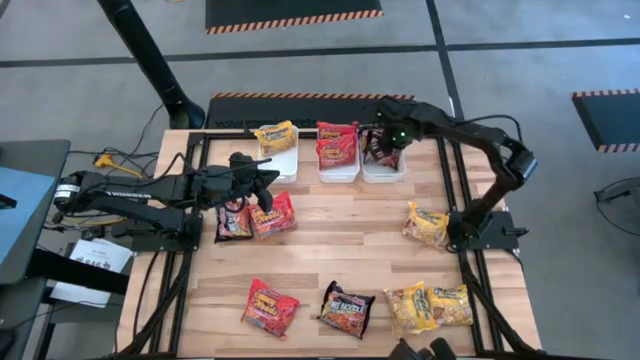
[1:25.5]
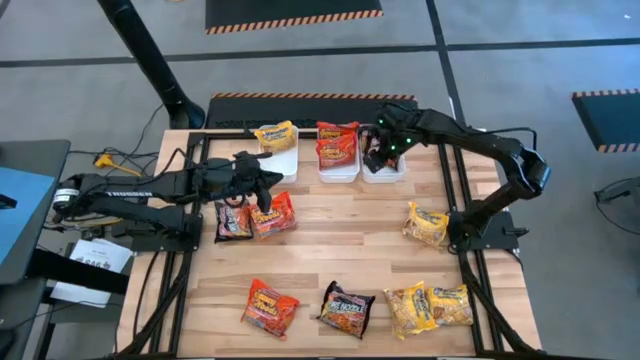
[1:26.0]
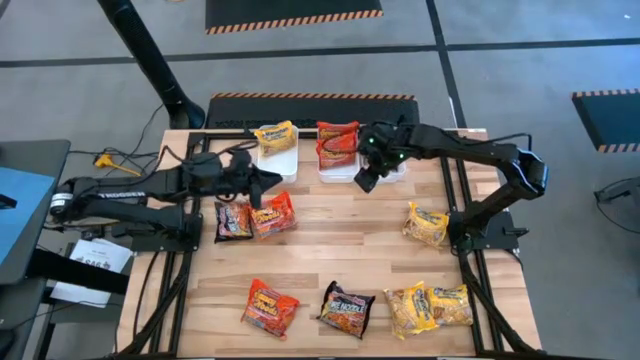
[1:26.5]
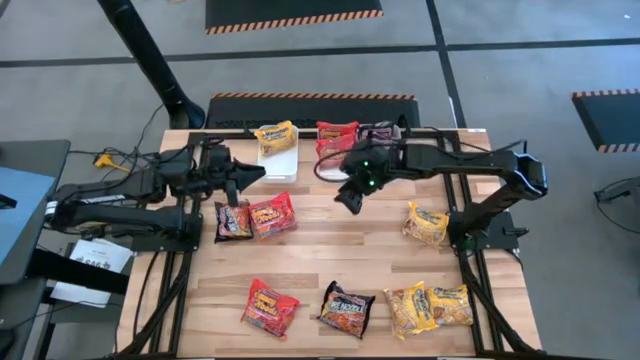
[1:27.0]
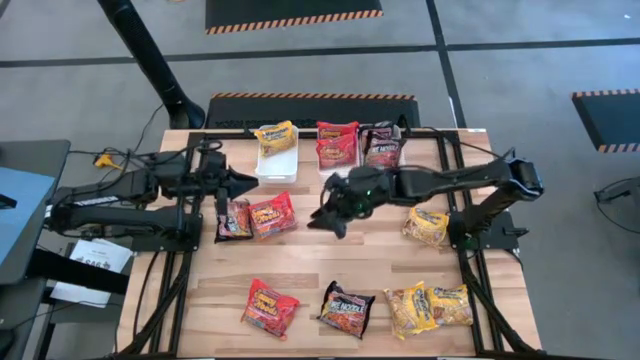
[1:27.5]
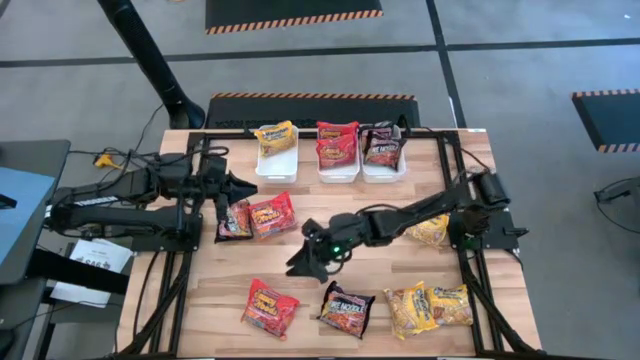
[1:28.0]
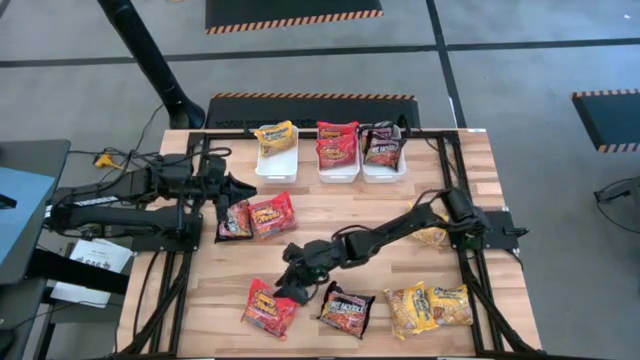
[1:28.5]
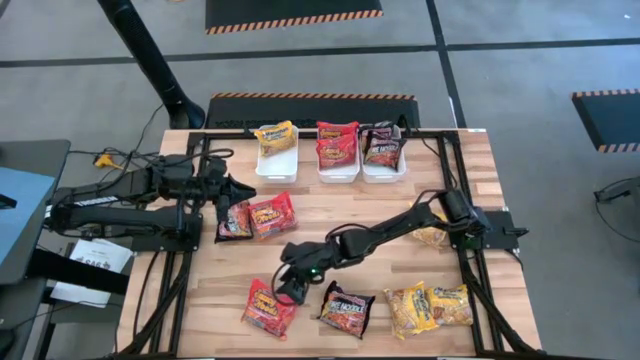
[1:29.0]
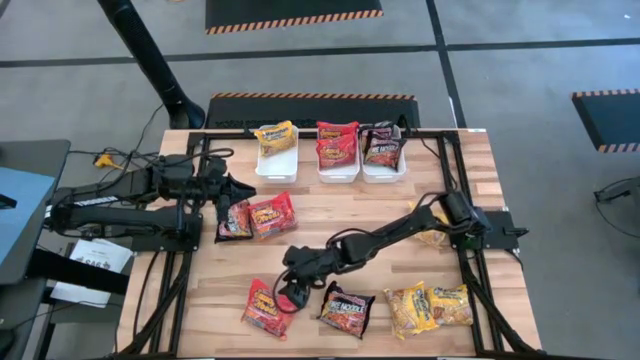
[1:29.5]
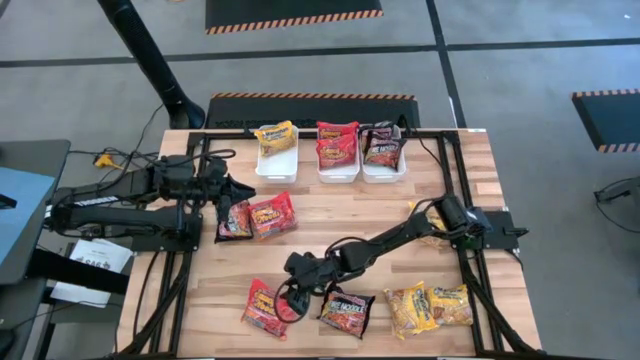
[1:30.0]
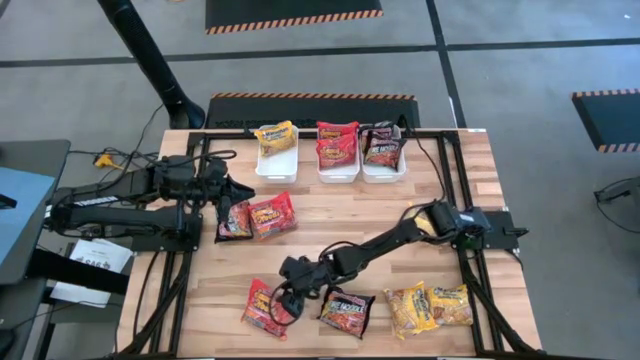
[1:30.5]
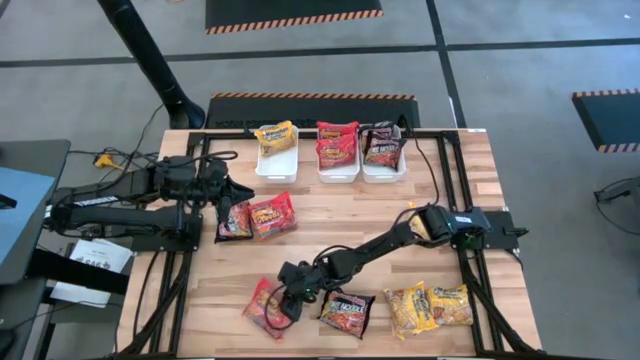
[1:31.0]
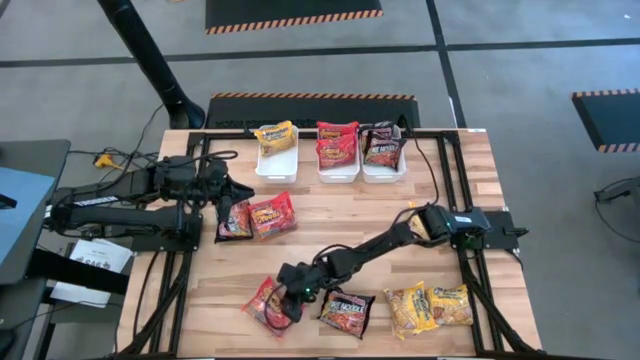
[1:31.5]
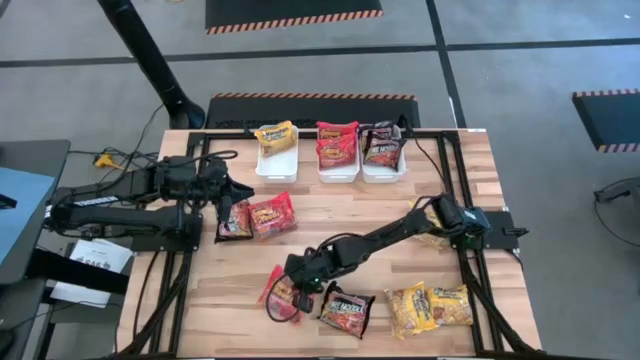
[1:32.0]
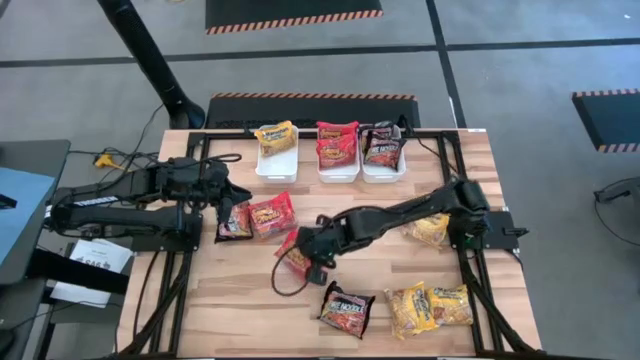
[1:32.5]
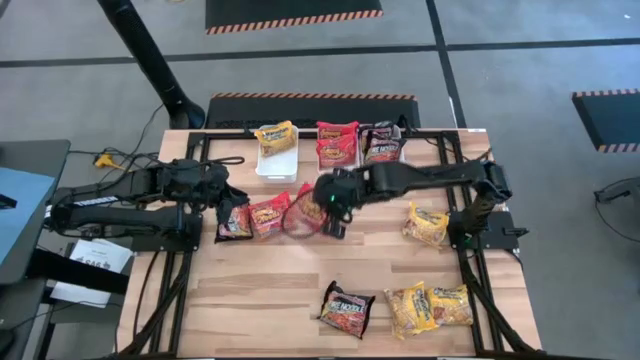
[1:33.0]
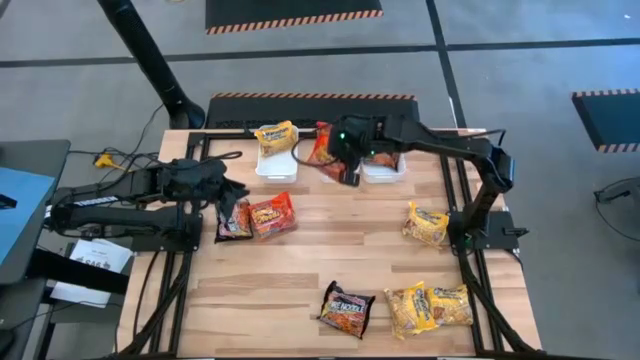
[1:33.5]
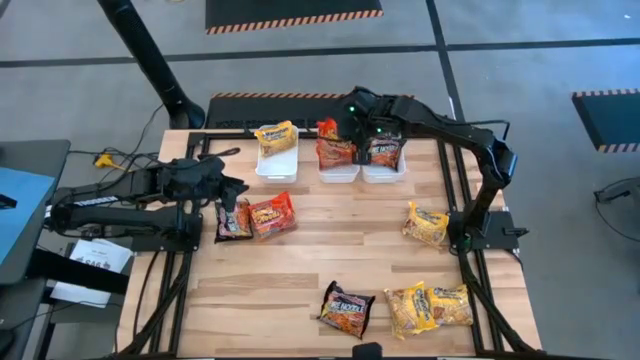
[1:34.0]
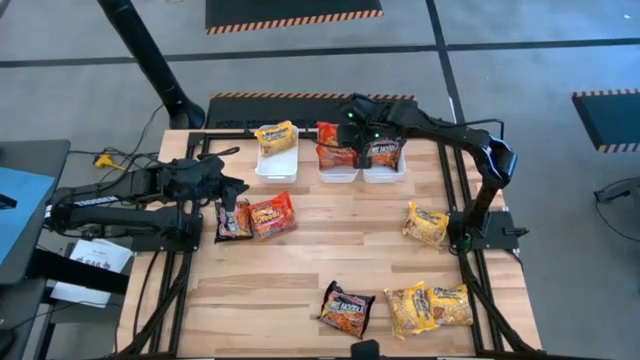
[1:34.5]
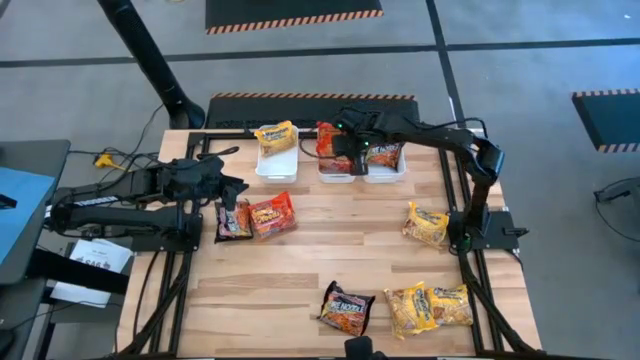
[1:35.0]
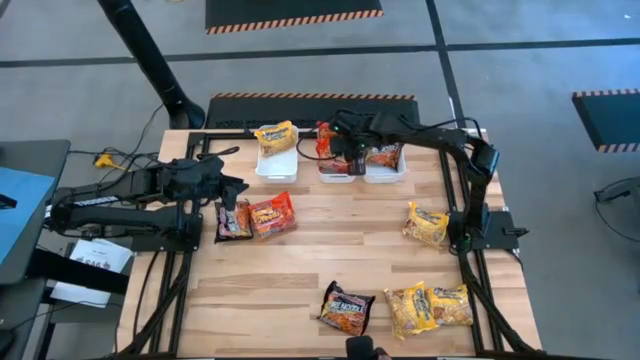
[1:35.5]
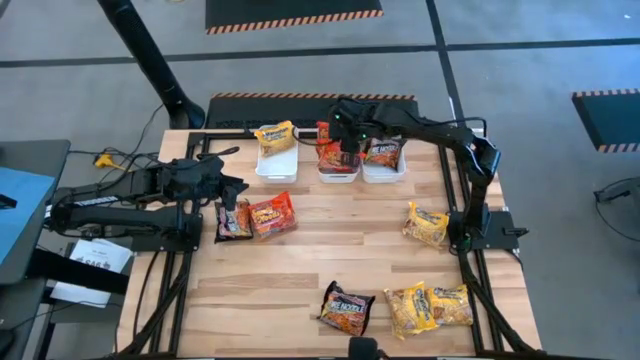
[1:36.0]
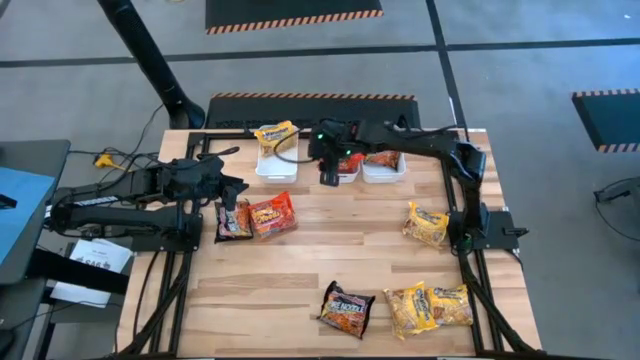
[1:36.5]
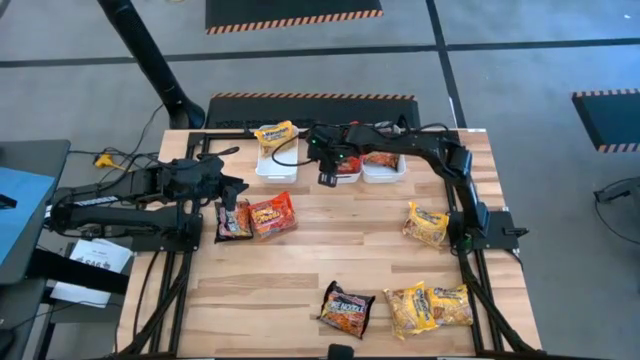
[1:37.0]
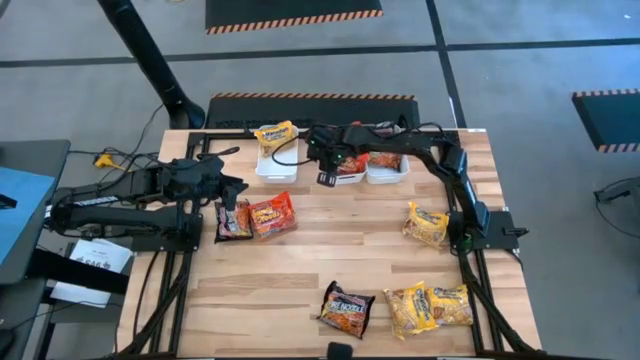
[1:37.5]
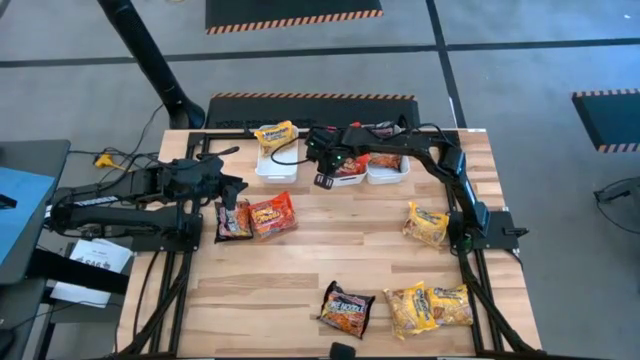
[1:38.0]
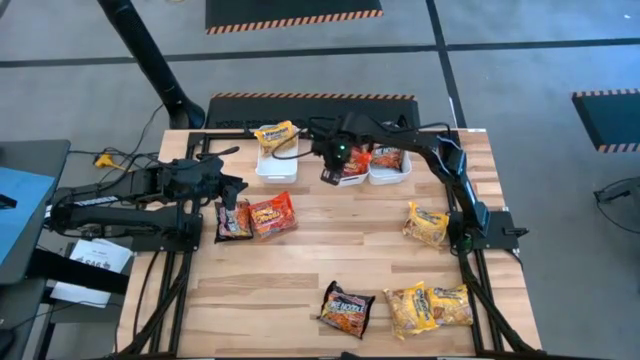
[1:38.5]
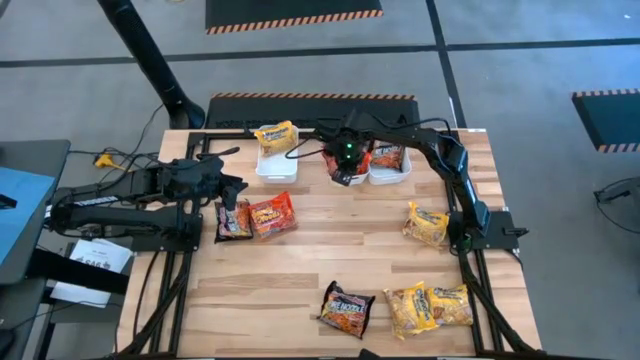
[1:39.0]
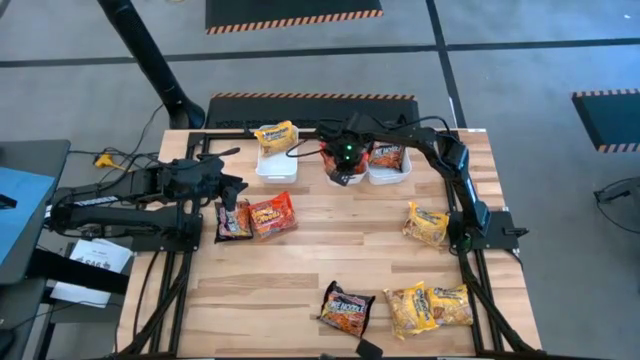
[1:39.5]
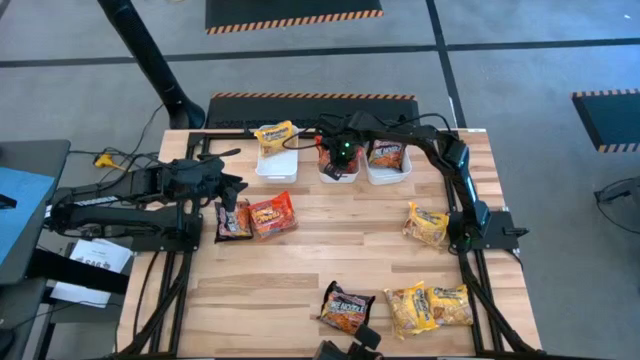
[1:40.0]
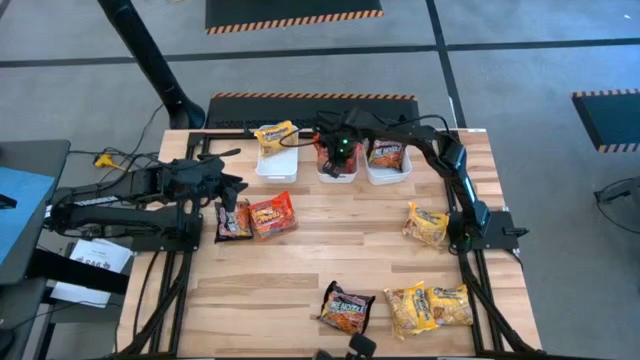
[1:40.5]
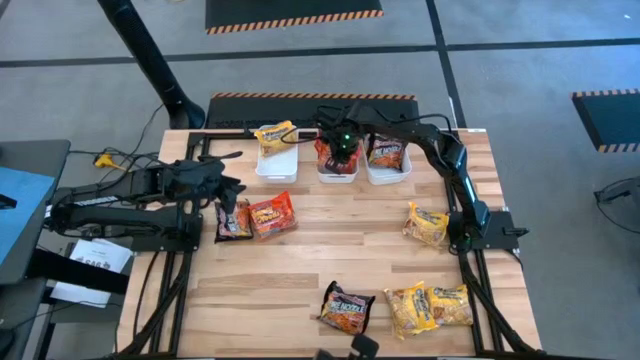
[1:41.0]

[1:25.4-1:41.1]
Task: Sort Maruchan noodles
Put the orange noodle pack into the middle white bin

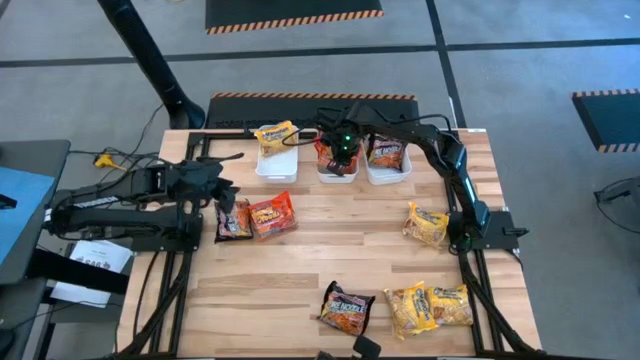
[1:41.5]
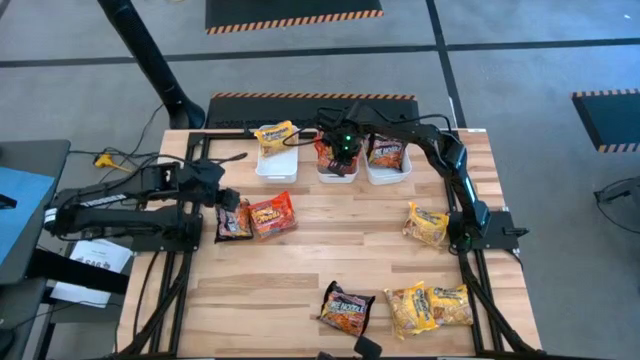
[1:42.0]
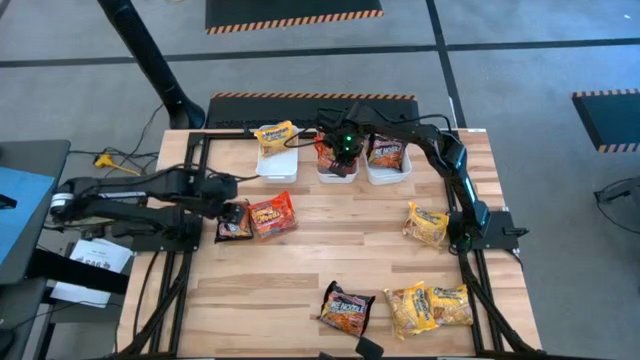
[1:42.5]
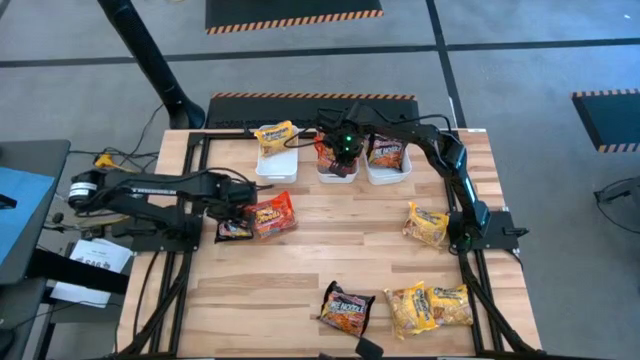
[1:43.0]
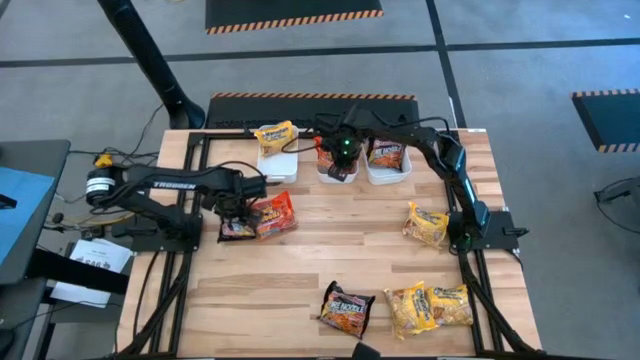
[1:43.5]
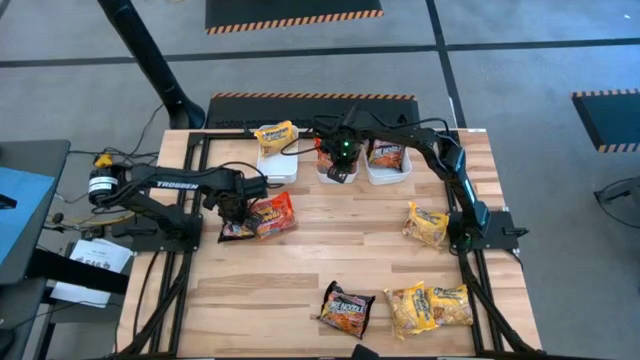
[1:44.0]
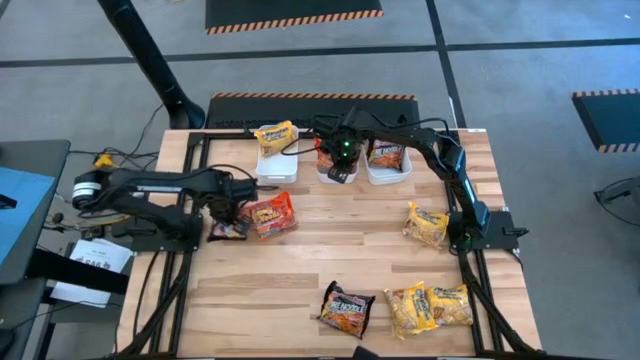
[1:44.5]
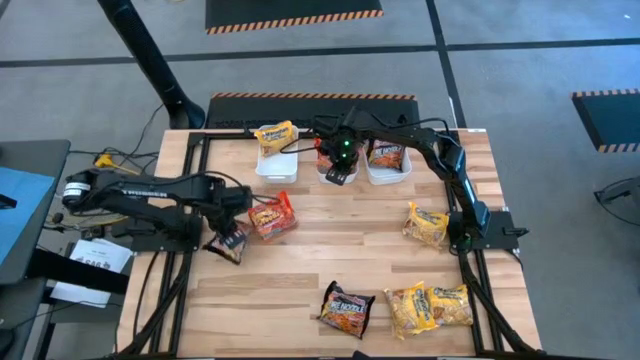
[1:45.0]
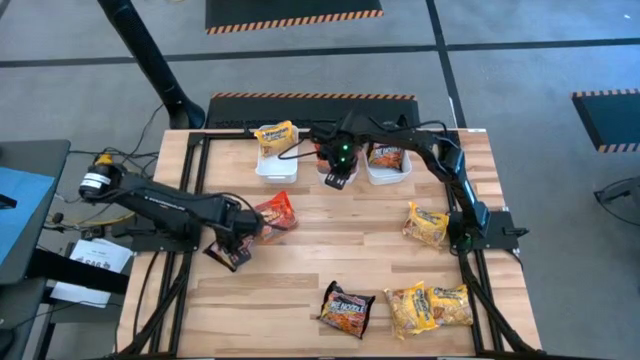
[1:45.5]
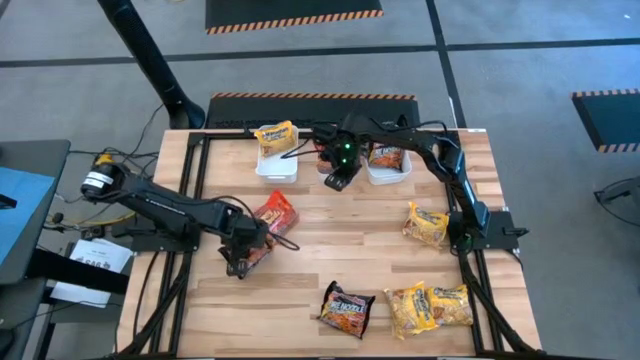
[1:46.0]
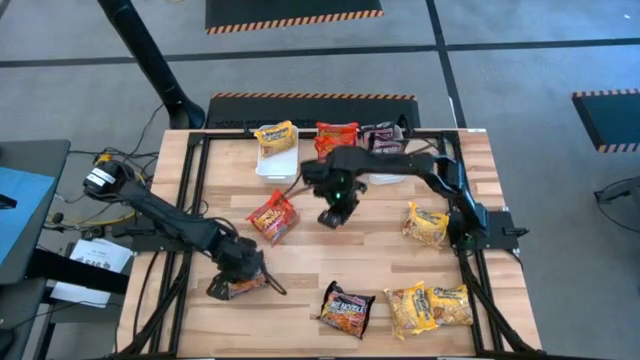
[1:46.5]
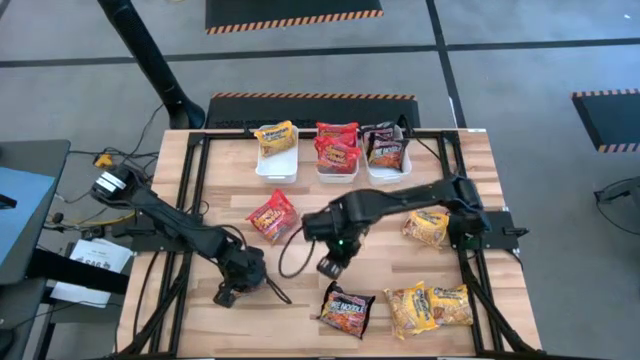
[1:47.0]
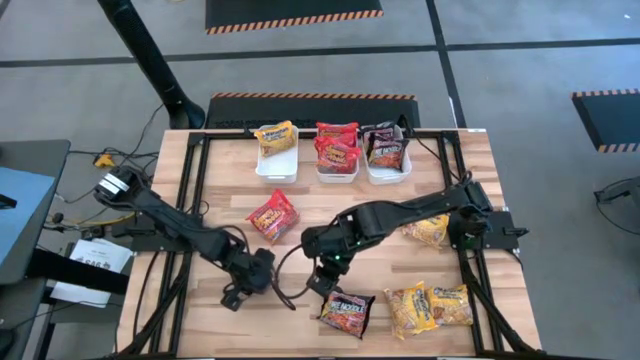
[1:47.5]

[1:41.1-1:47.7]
Put the black noodle pack into the right white bin
